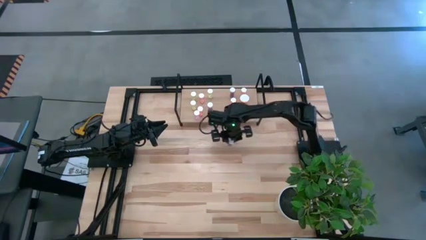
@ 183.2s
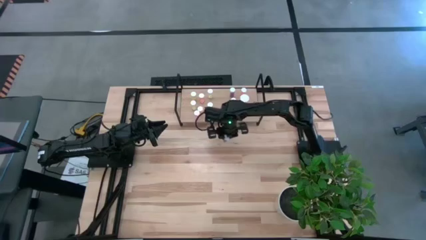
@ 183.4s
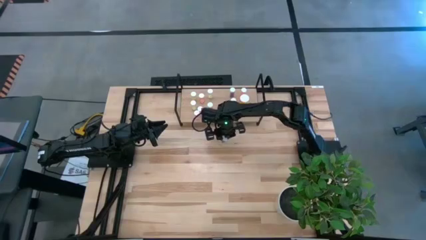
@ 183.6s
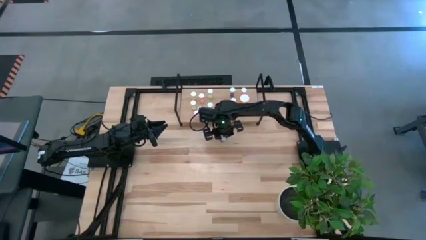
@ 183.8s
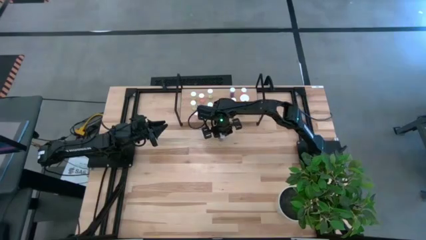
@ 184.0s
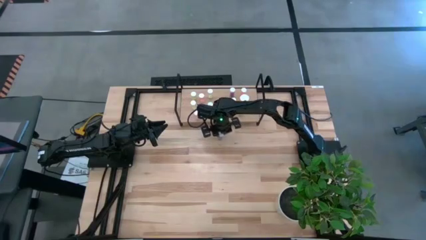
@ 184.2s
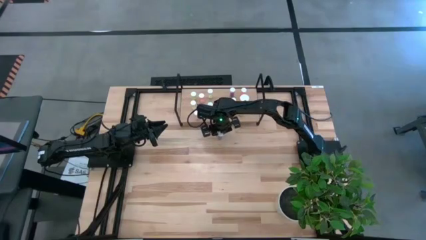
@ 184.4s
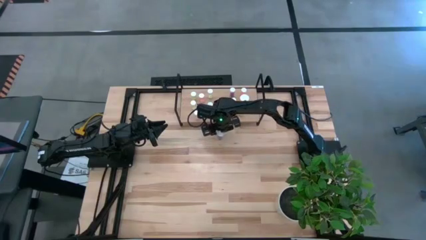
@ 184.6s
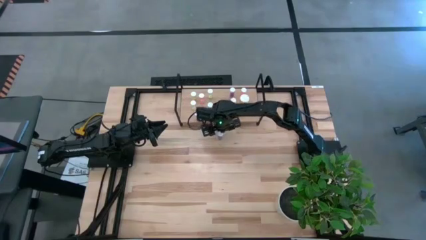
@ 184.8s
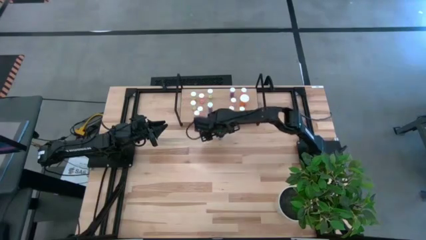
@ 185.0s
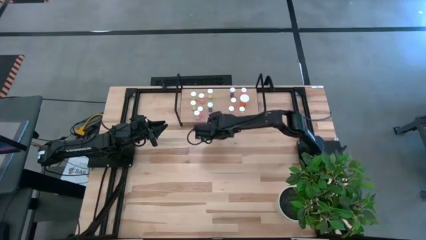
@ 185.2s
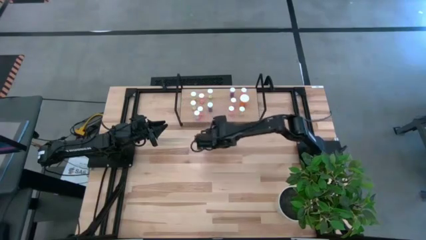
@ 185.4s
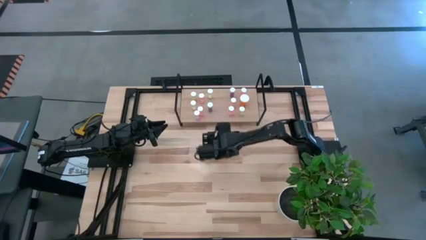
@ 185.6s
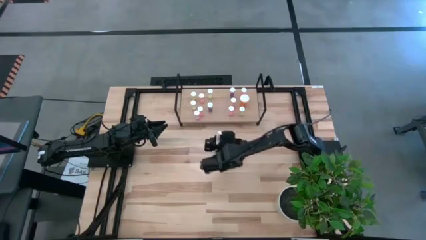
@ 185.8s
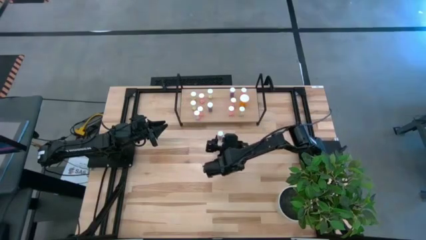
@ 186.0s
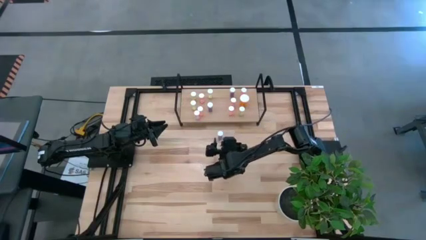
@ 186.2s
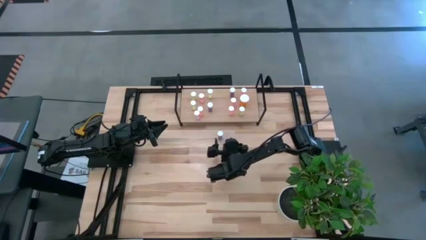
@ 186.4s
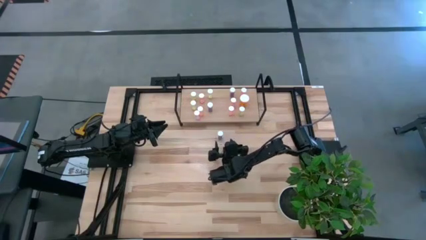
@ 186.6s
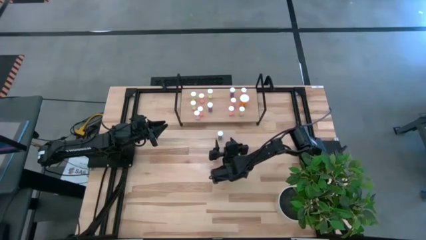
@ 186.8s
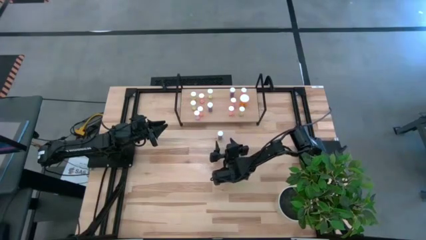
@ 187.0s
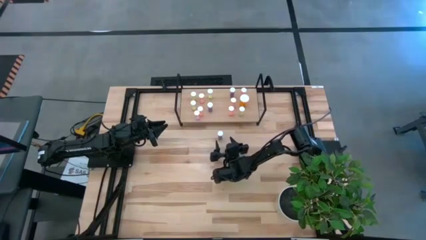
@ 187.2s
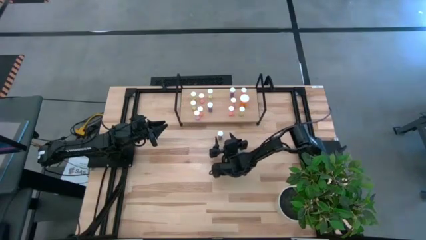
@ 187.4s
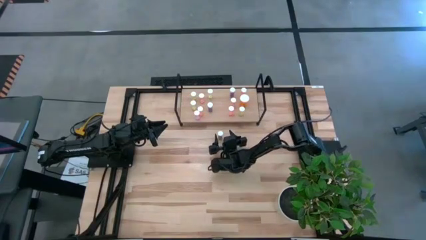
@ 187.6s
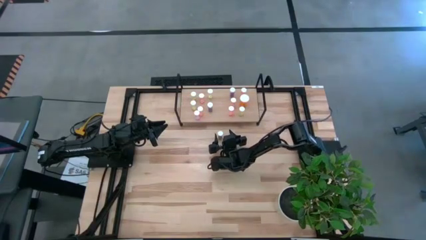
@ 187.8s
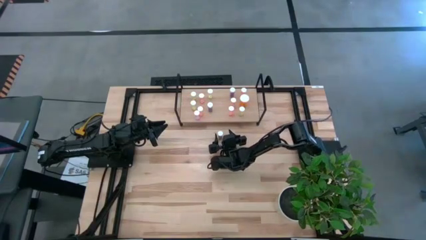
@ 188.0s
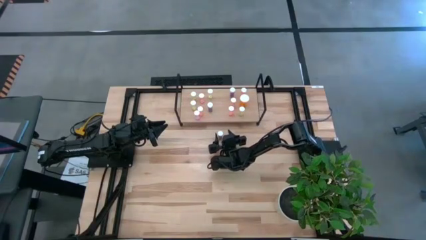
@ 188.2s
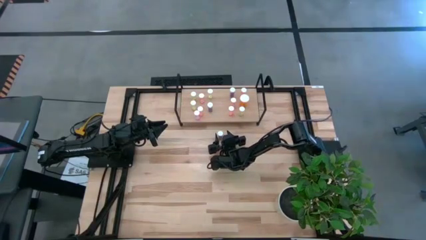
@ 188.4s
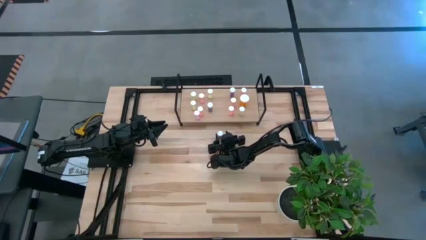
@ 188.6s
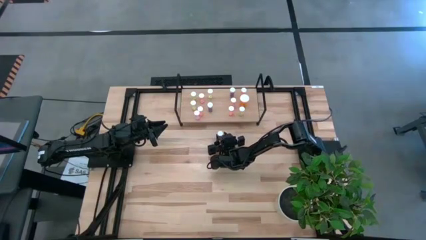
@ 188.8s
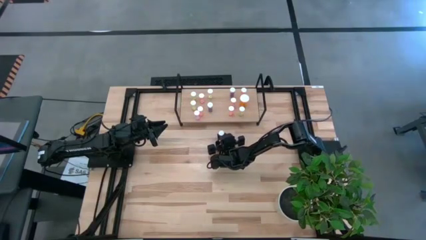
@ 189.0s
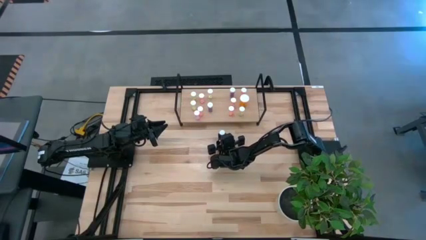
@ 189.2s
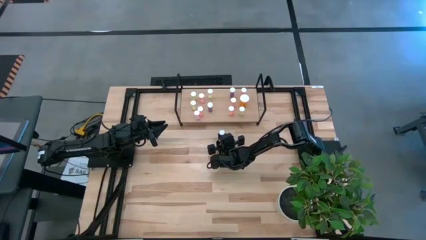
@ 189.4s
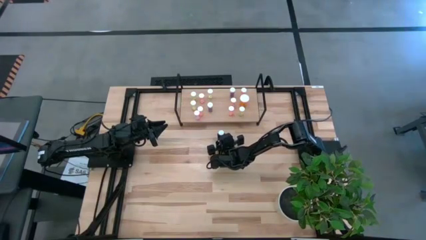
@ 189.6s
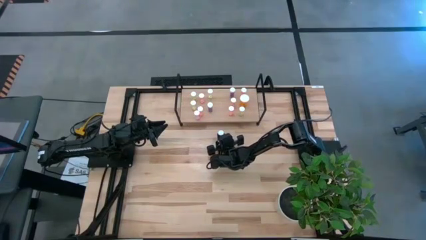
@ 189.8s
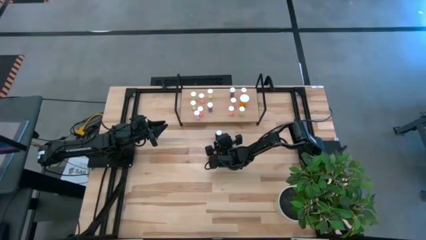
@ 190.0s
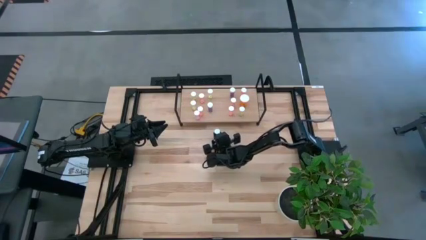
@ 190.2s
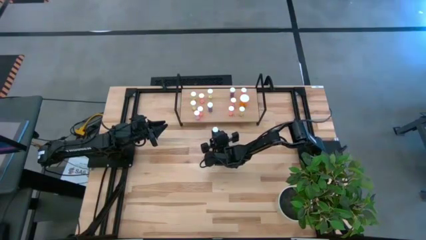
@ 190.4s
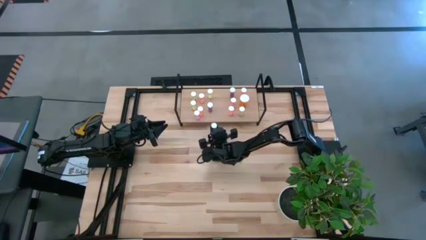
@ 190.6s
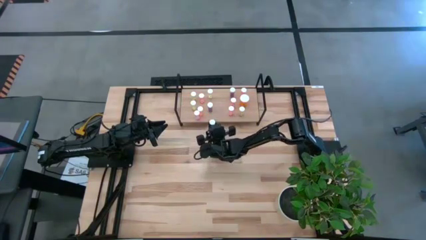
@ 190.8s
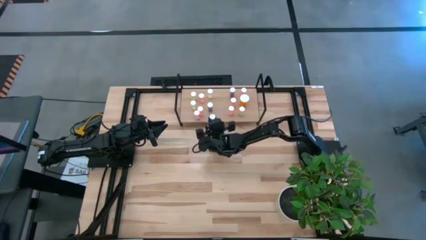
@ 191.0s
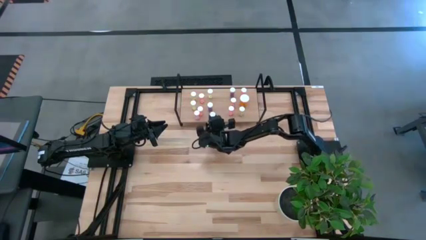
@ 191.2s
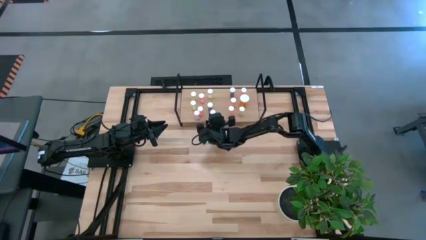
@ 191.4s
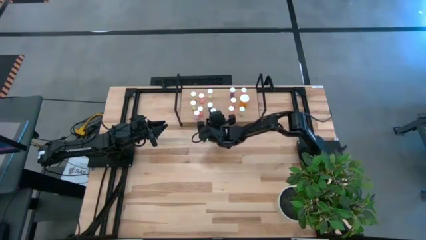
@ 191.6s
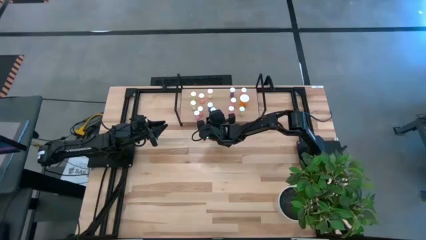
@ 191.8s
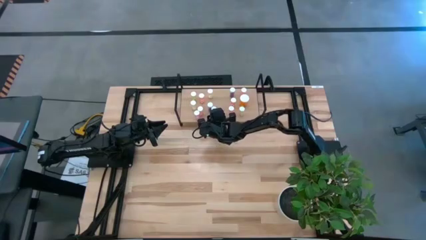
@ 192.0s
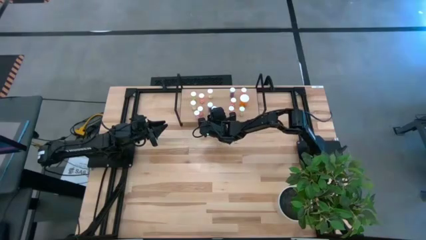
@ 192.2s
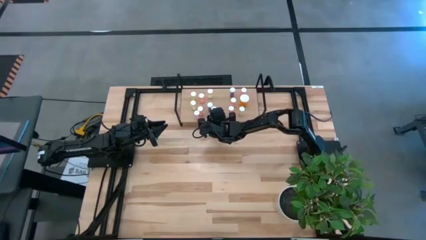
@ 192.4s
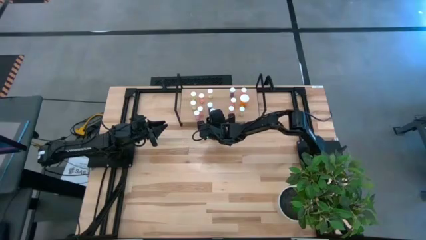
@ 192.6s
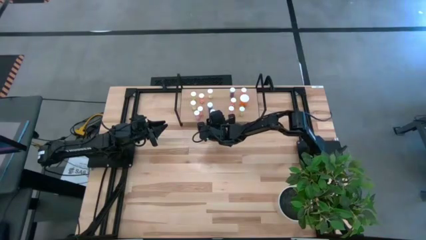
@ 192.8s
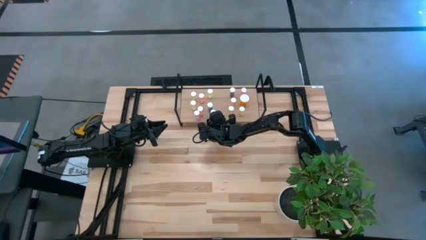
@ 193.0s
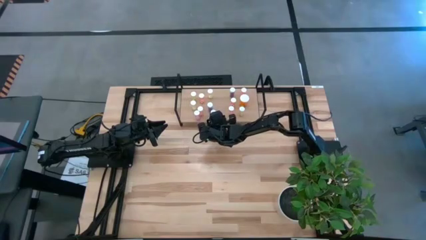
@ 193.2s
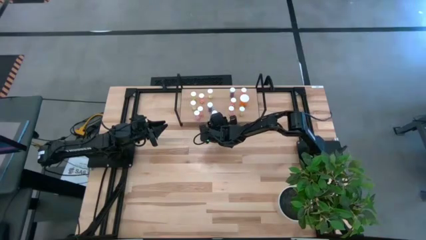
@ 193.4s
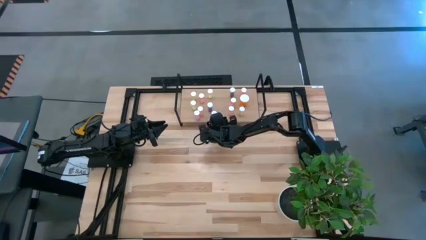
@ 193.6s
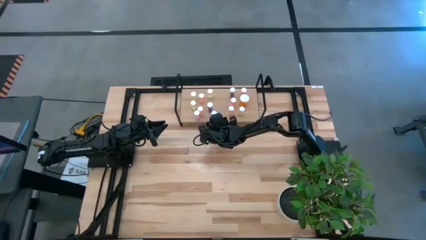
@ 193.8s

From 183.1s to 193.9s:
Task: Pick and place medicine bottles onto shelf by color
Put the blue pill bottle on the shelf

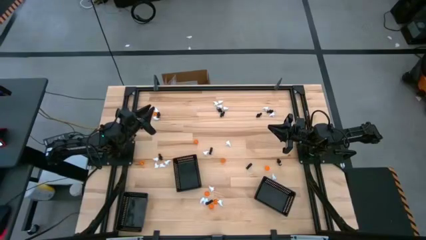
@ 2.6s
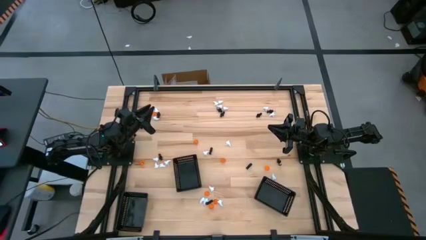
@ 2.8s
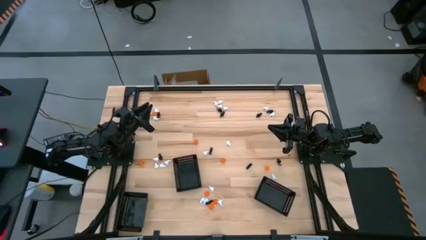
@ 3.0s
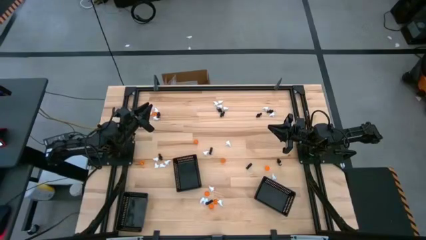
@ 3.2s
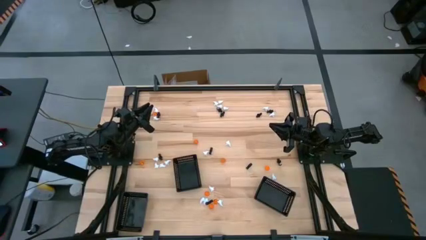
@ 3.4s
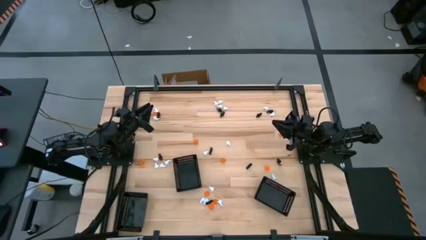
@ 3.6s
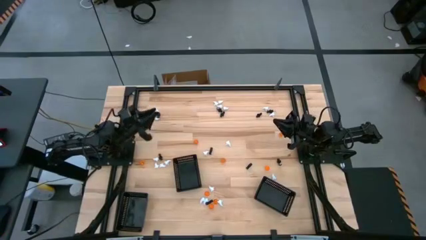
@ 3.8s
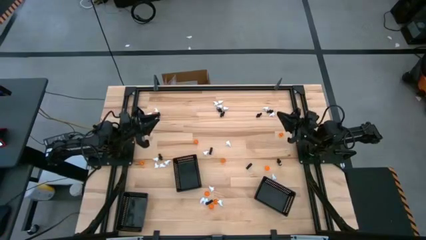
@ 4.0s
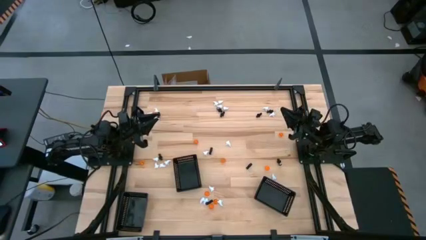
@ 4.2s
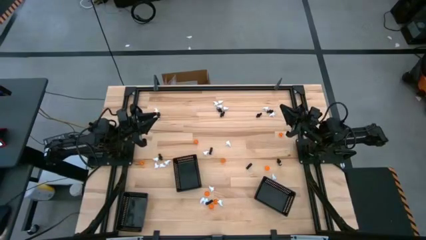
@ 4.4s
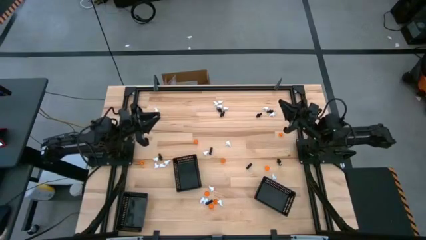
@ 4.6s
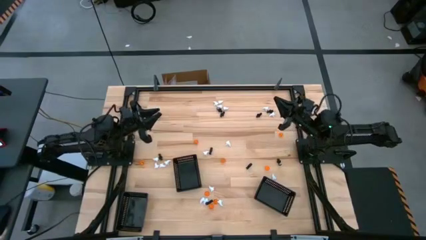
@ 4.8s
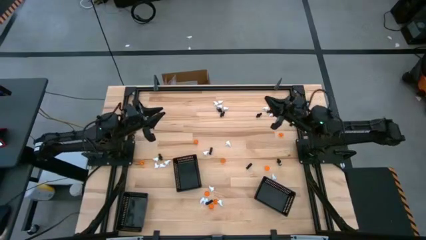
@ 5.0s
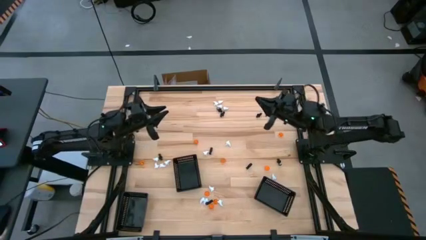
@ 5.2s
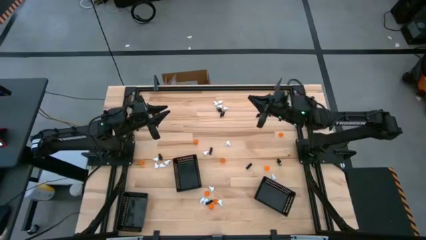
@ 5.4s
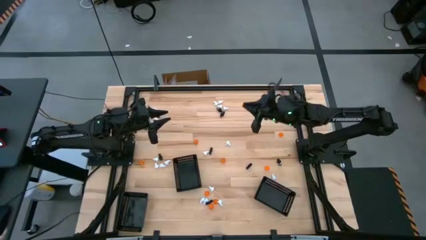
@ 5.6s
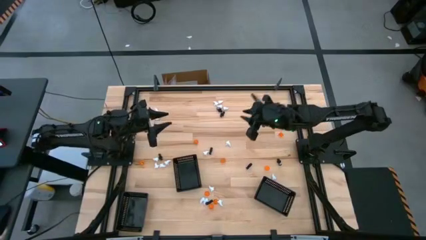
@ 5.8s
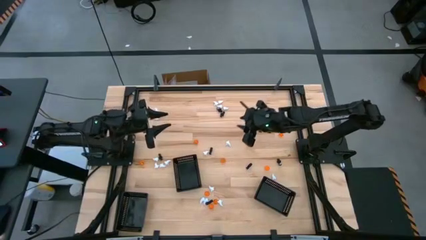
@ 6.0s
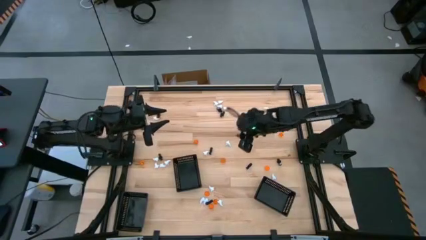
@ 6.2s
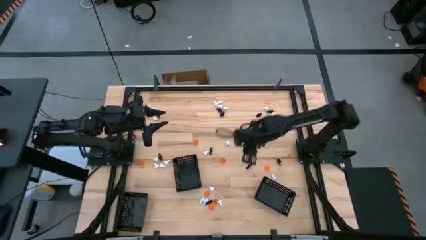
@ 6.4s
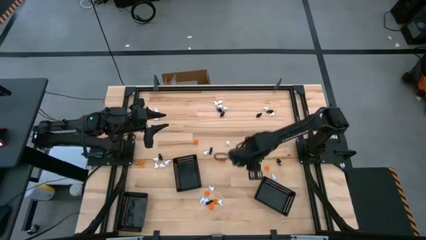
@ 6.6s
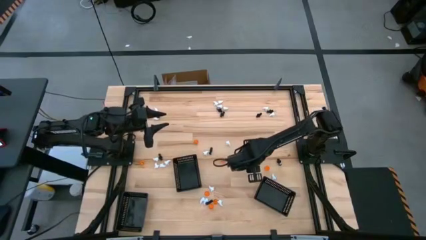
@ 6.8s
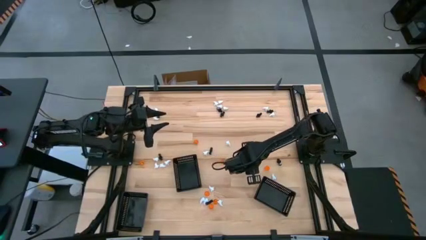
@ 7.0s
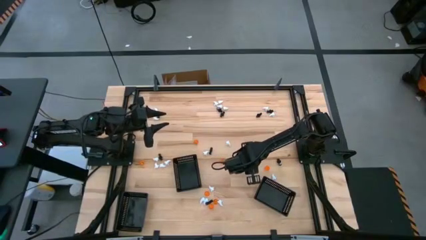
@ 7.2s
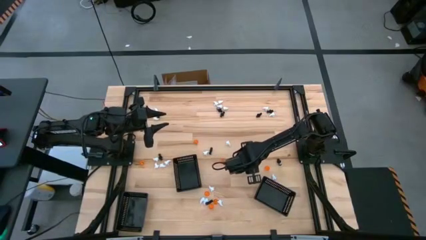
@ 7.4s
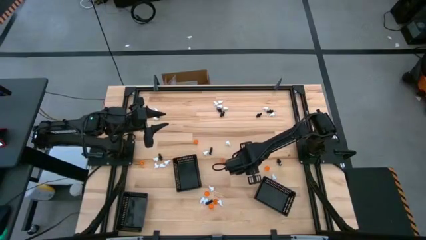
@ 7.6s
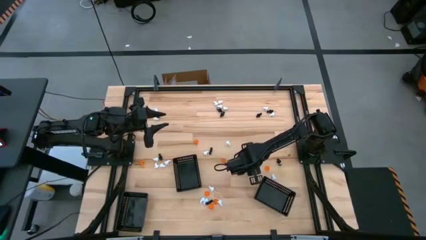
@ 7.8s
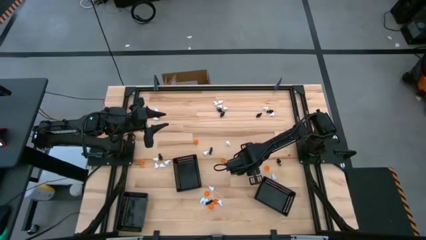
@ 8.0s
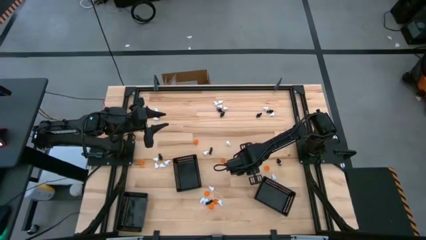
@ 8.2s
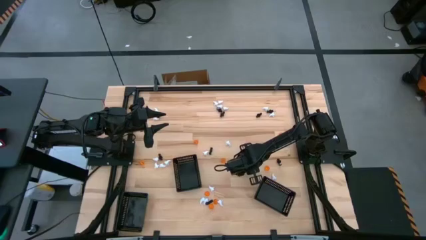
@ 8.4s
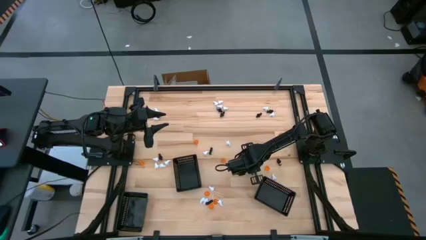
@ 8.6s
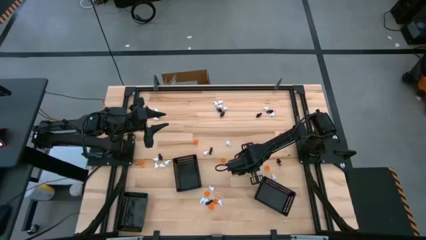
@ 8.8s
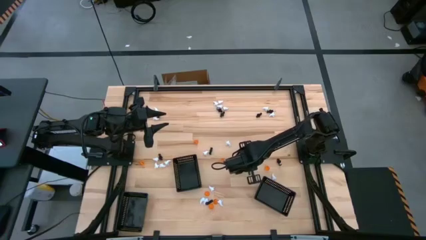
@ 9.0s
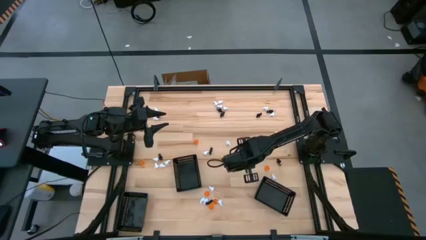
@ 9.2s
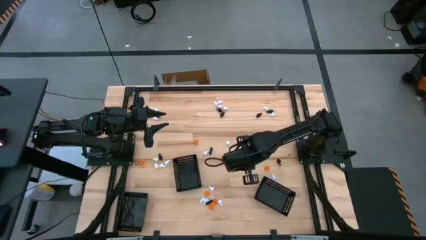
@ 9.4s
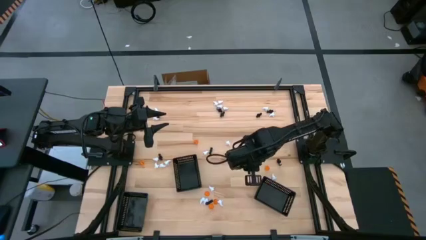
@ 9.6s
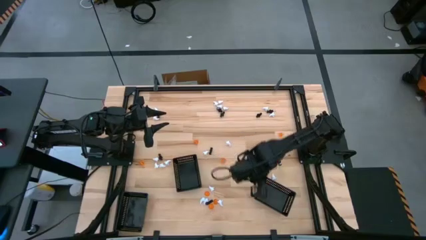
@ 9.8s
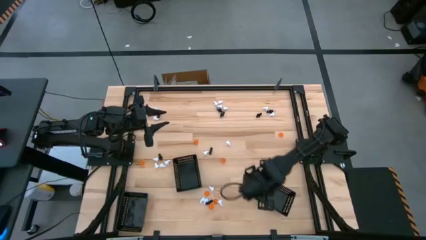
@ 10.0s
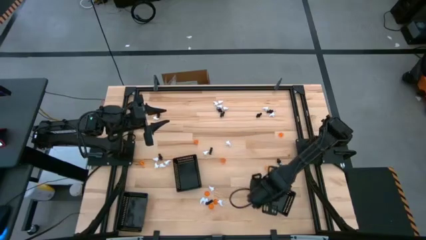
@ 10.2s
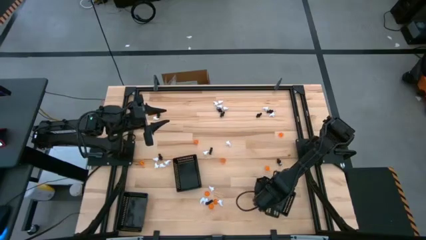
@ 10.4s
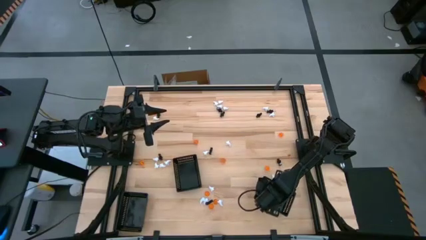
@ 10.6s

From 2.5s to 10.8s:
Task: Sort Halloween decoration
Put the black skeleton toy into the right black basket
